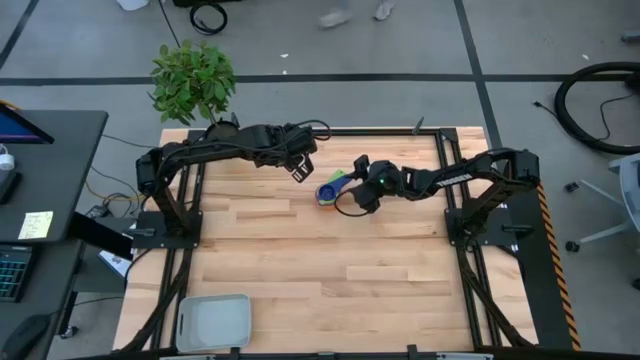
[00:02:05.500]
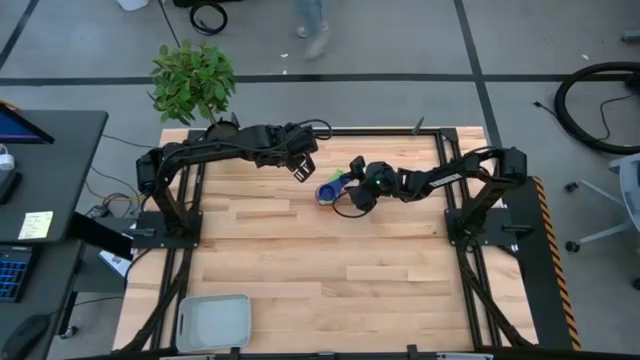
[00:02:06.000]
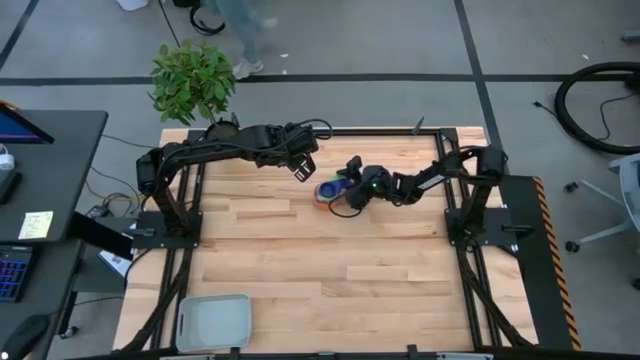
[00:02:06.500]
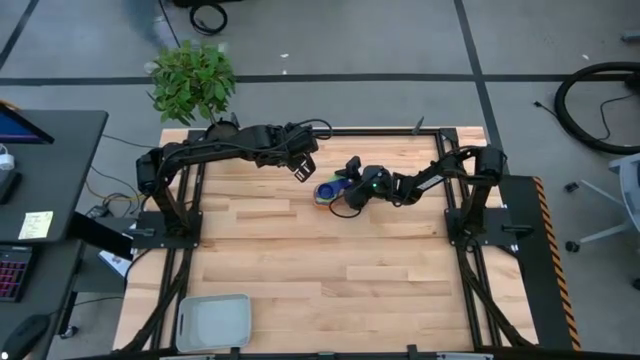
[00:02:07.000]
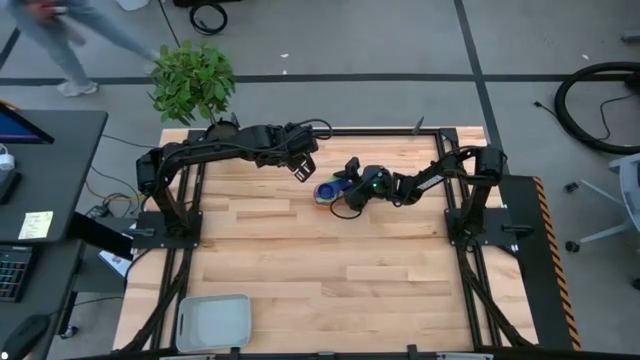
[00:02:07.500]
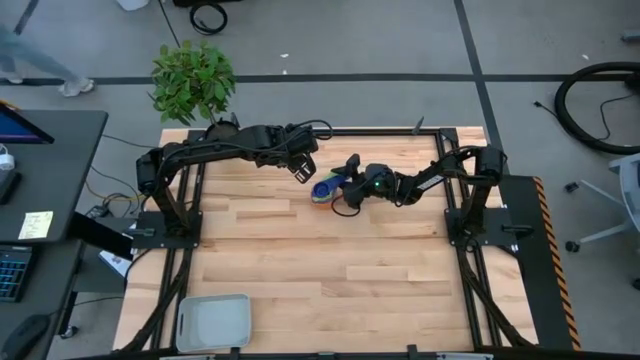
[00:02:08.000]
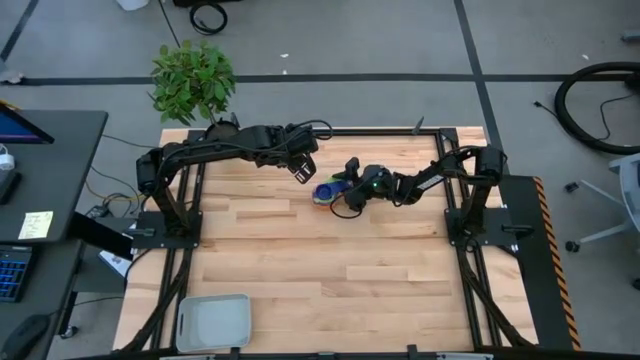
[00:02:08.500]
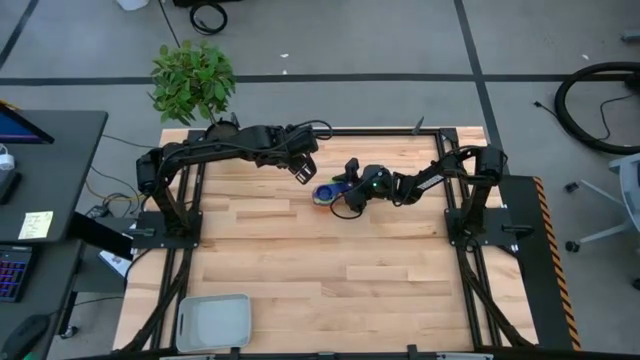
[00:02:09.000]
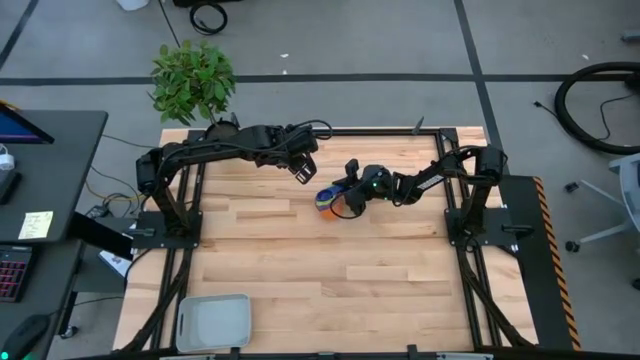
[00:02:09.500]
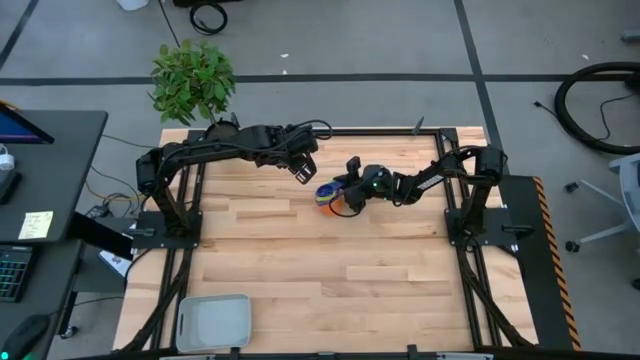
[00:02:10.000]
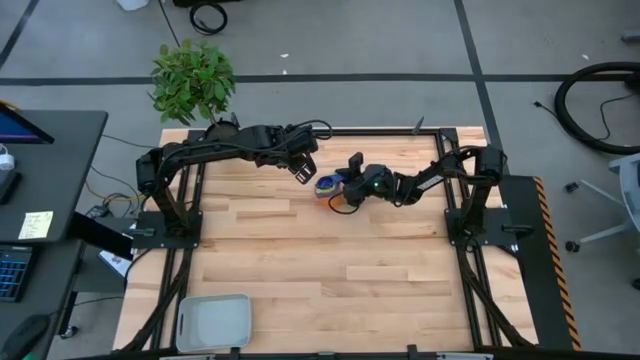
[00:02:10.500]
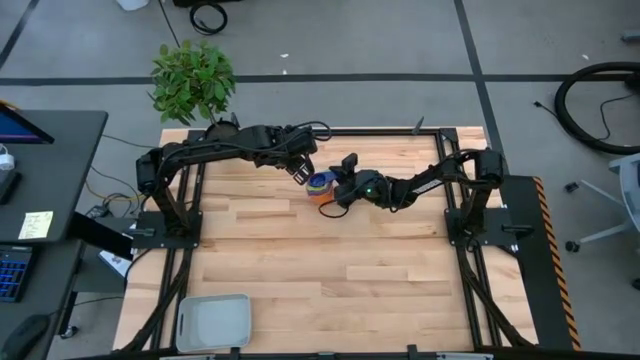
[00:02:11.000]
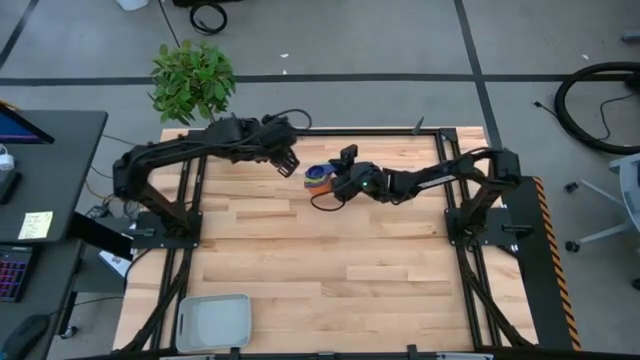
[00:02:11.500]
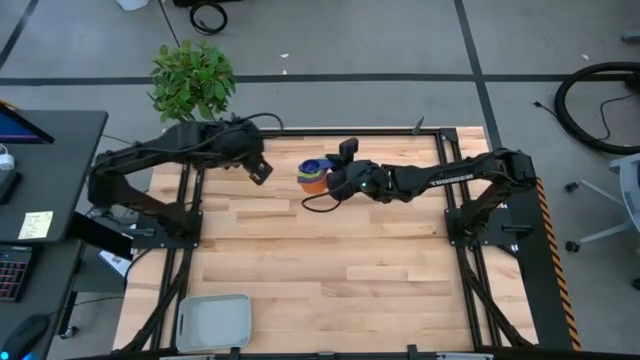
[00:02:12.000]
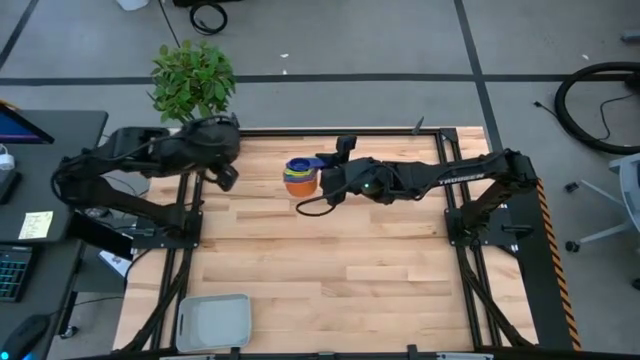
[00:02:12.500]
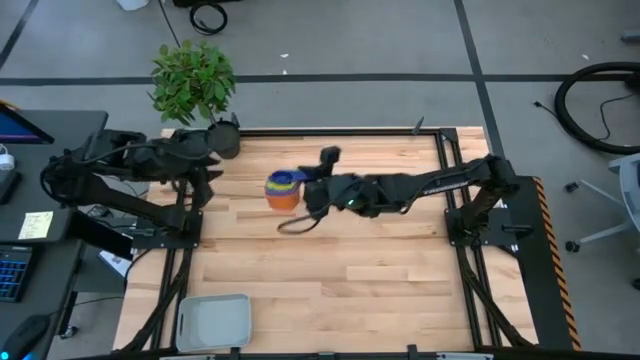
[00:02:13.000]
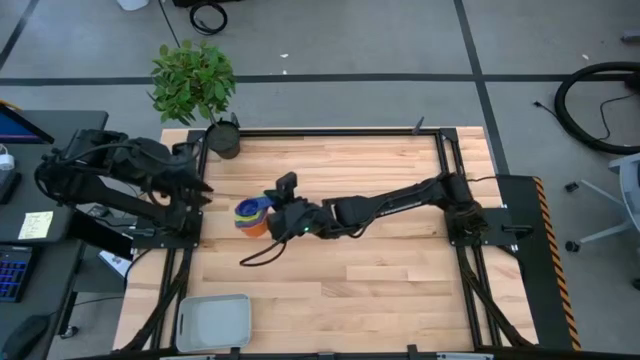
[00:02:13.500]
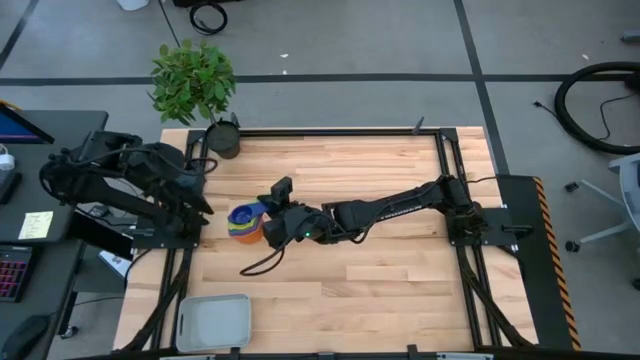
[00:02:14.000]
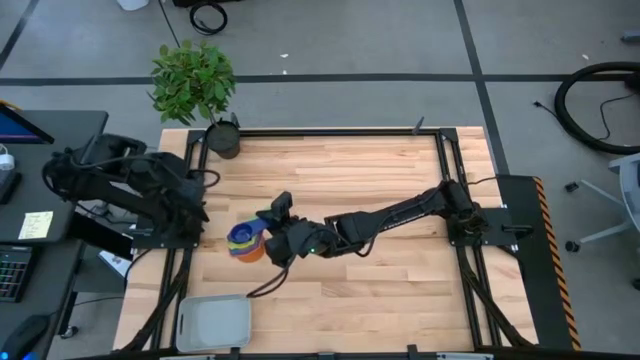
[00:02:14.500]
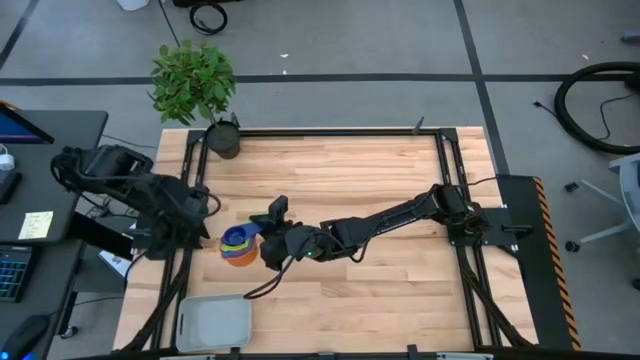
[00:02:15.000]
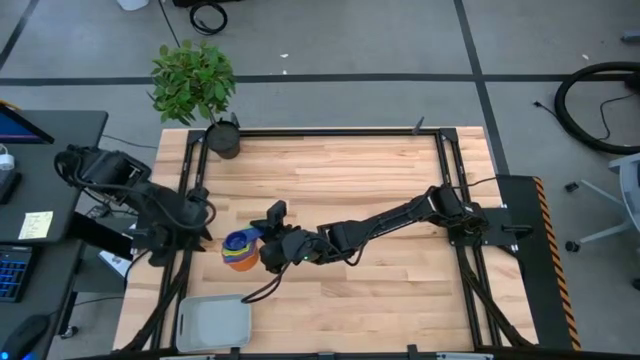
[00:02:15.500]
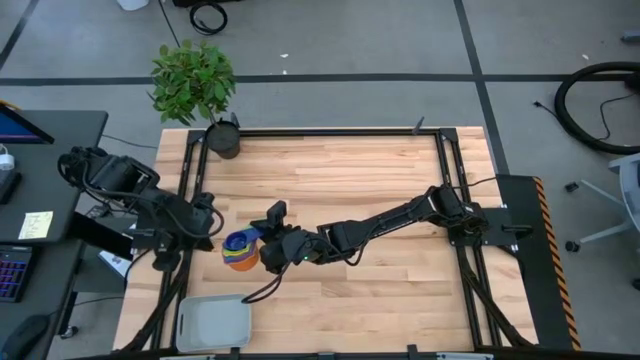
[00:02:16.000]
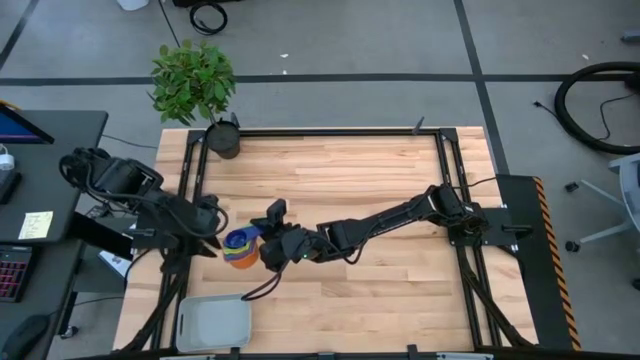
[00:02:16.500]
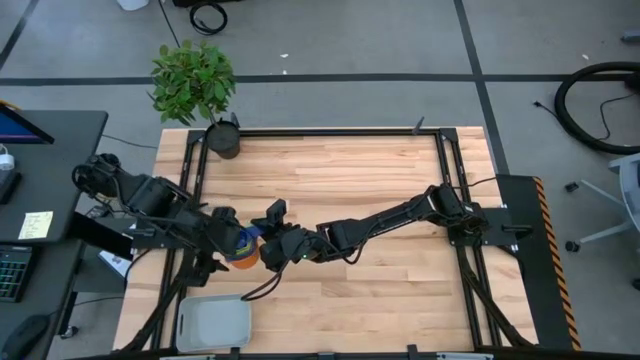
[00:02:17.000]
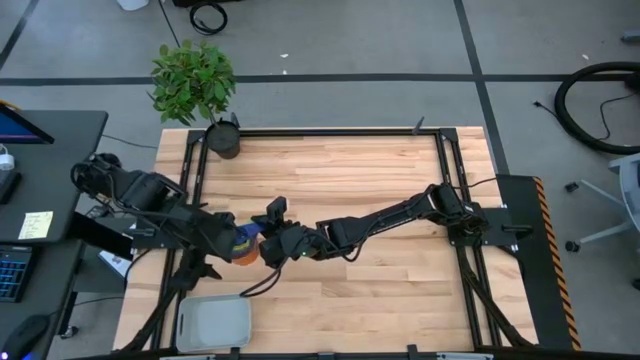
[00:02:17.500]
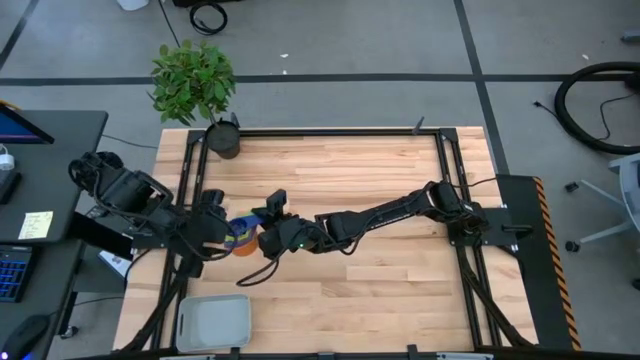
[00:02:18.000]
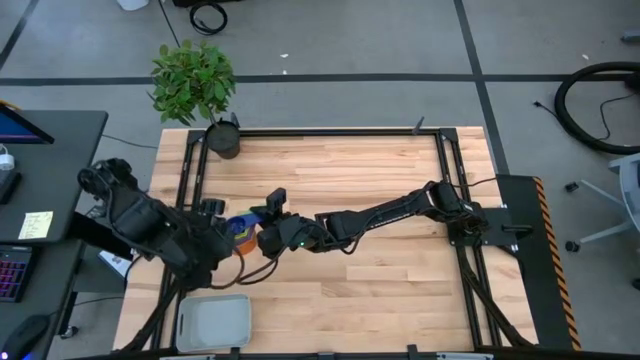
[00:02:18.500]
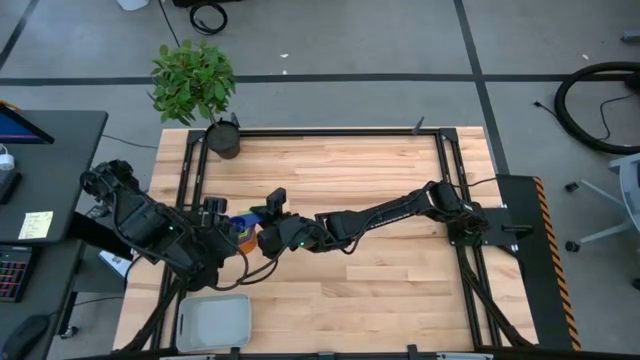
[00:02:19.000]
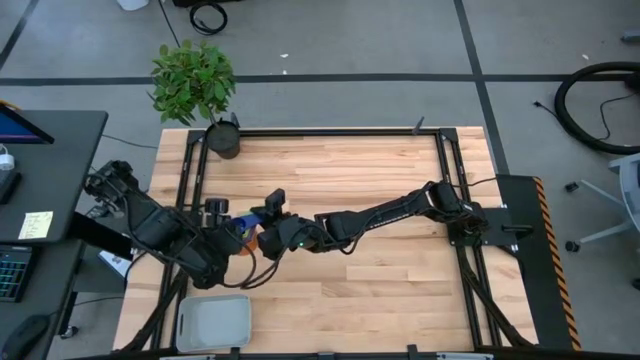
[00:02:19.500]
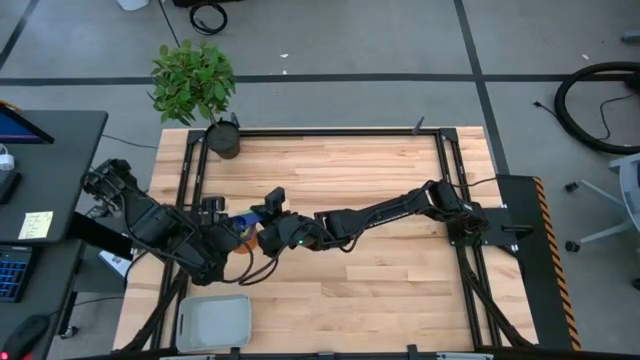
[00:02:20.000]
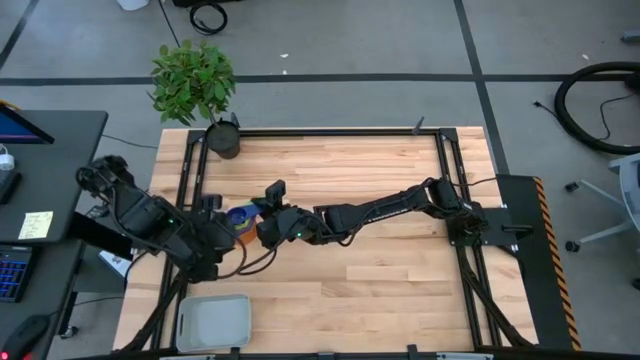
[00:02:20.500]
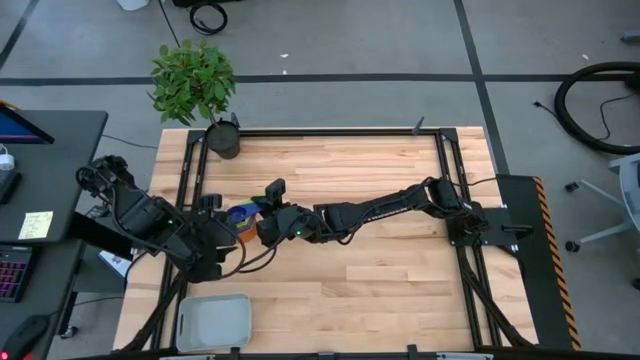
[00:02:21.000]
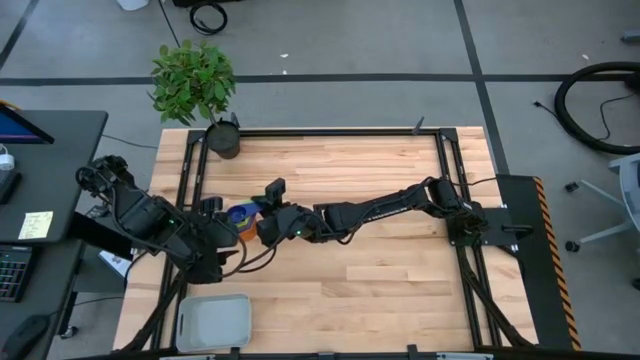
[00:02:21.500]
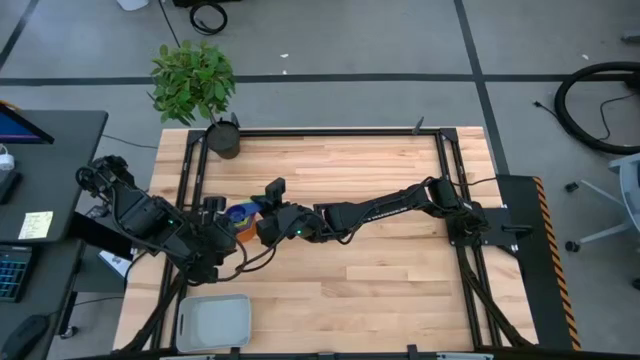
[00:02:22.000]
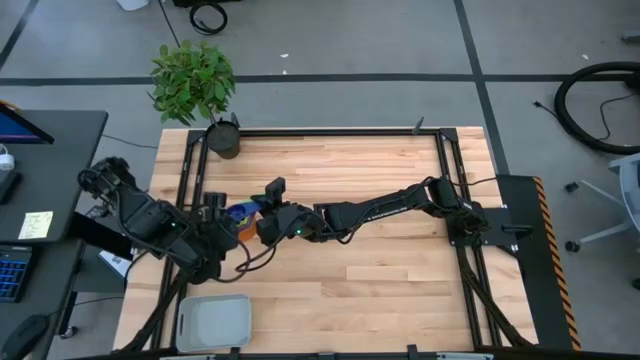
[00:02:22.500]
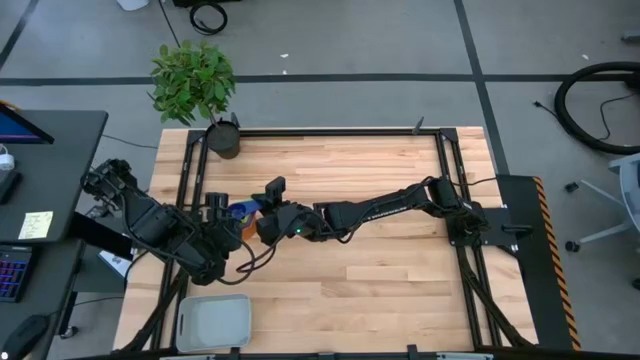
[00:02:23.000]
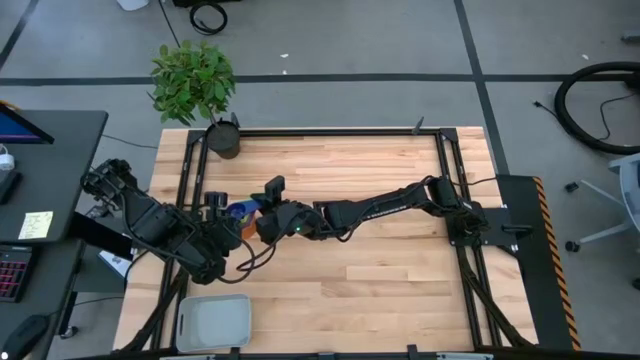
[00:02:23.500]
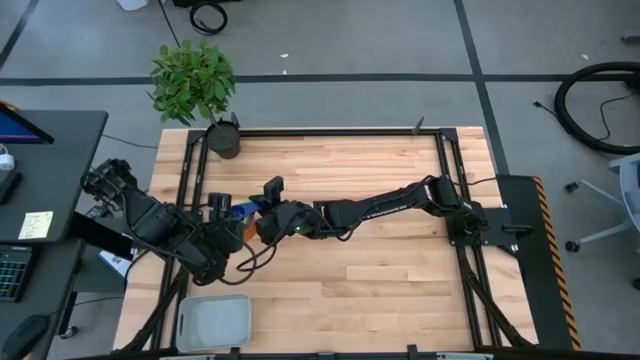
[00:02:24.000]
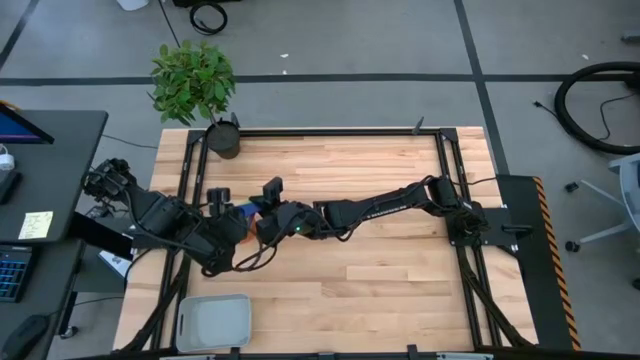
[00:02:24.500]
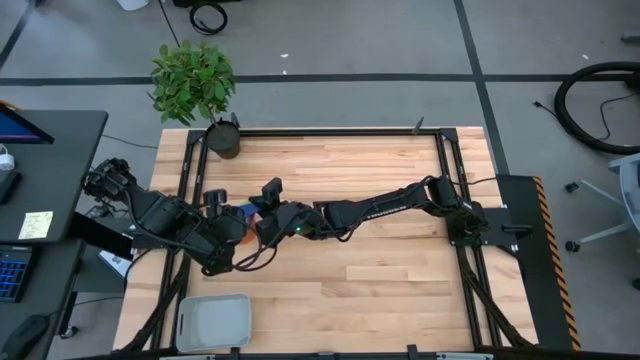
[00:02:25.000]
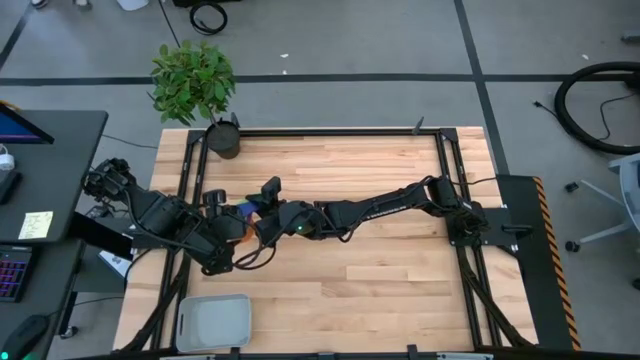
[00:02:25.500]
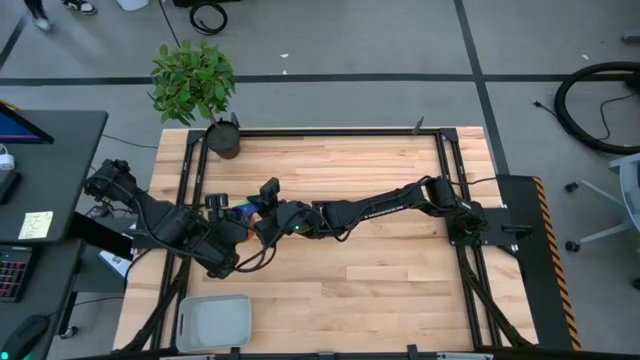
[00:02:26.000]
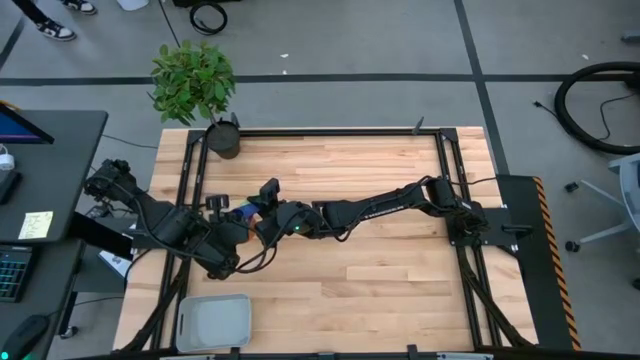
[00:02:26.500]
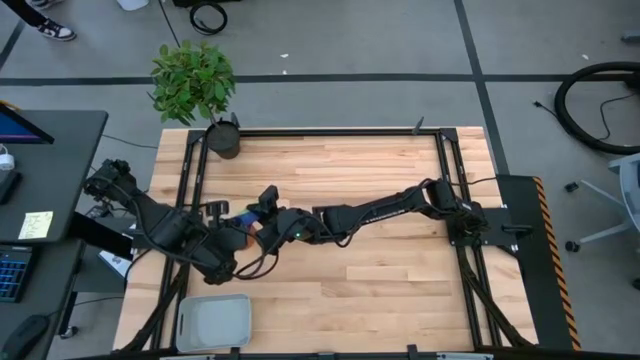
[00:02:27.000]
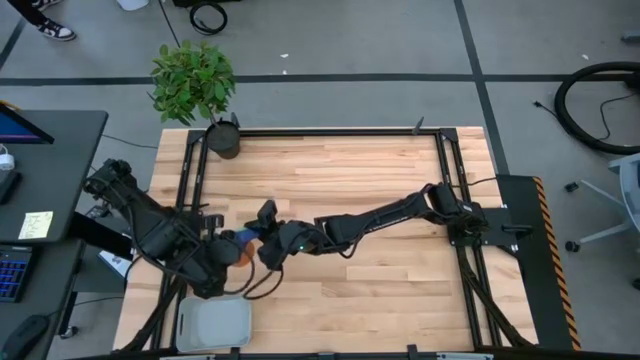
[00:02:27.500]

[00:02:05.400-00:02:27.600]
Task: Nest measuring cups in basket
Put the stacked measuring cups into the gray bin
